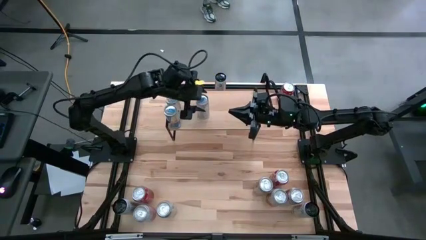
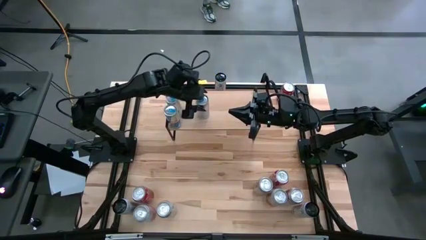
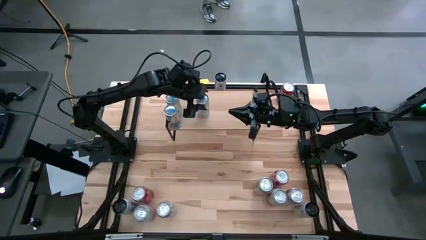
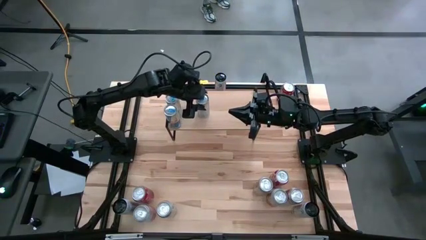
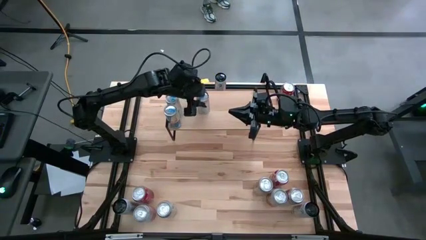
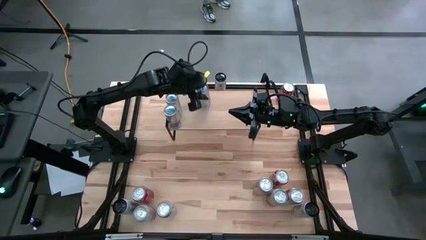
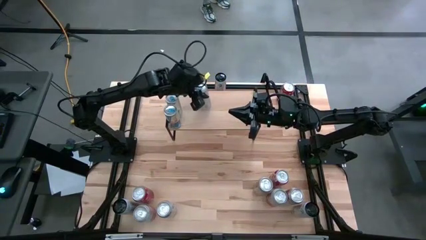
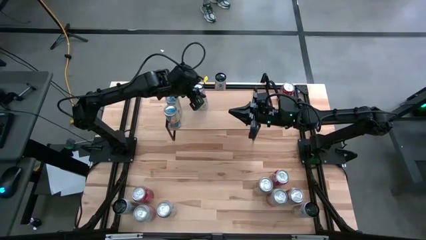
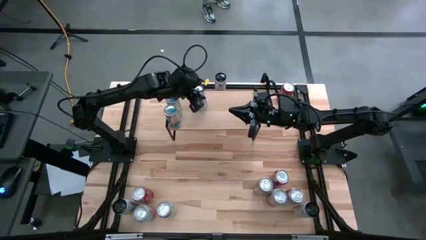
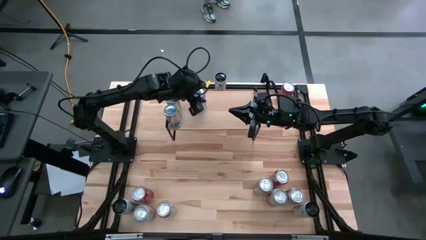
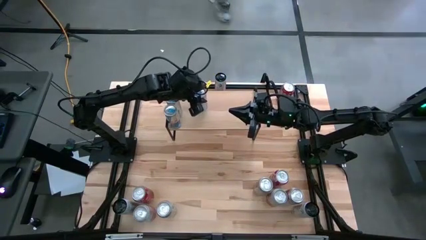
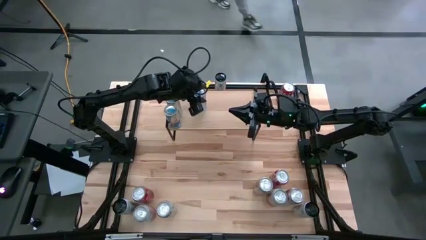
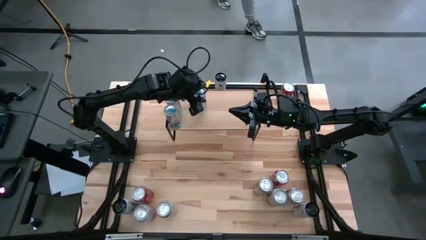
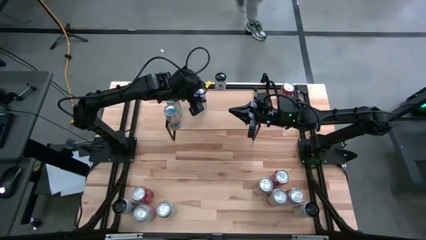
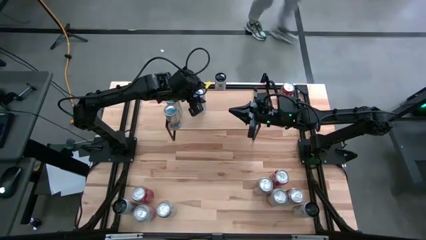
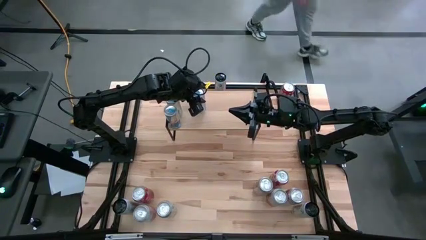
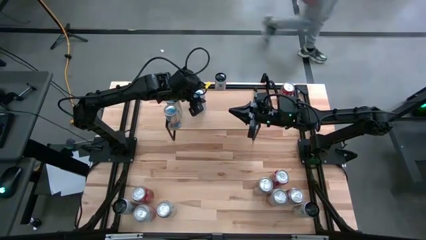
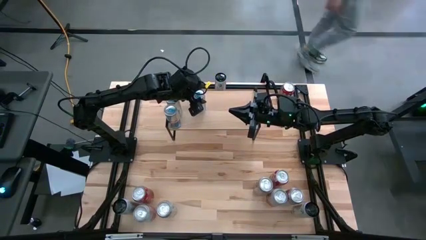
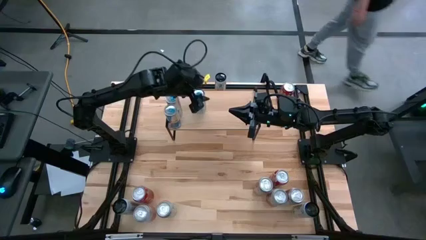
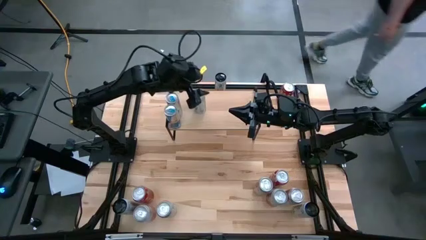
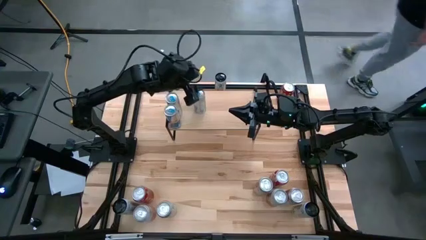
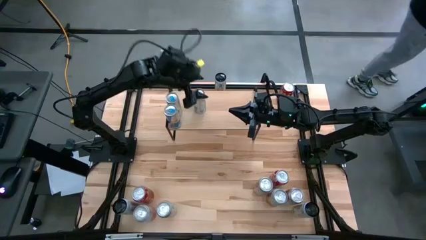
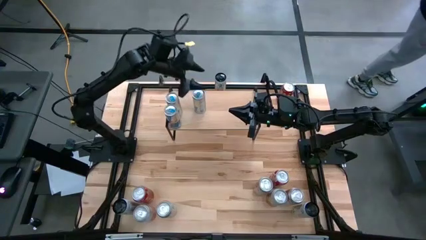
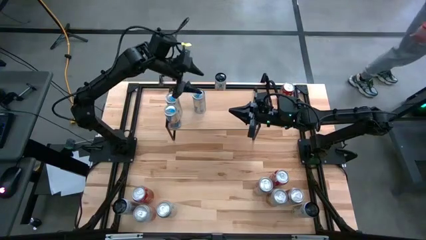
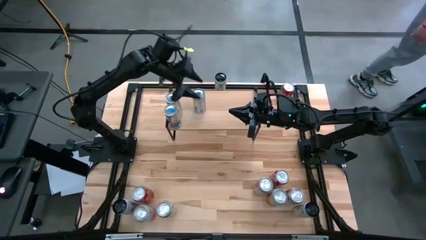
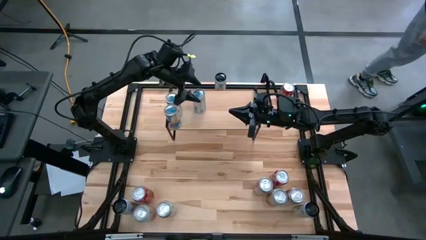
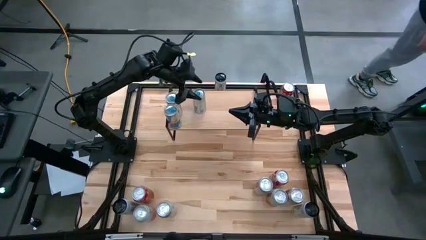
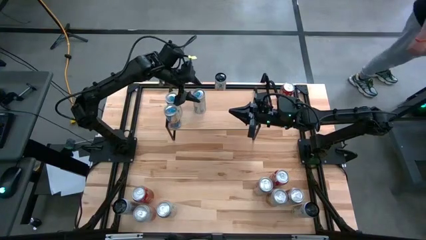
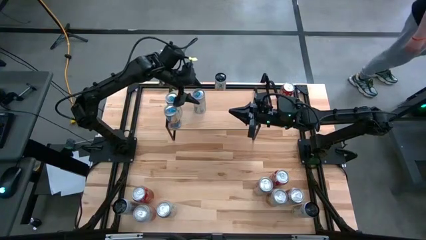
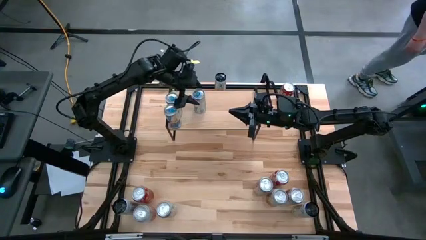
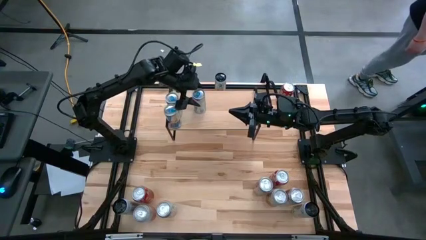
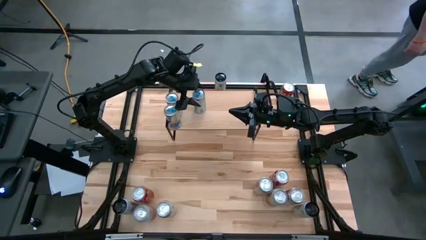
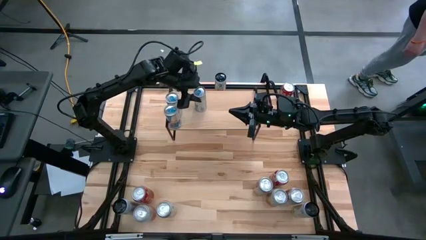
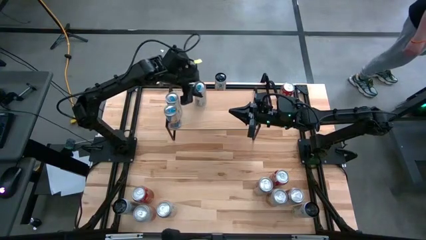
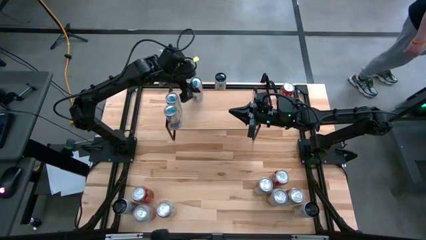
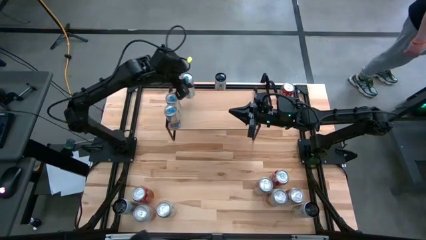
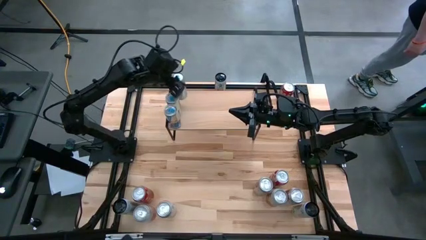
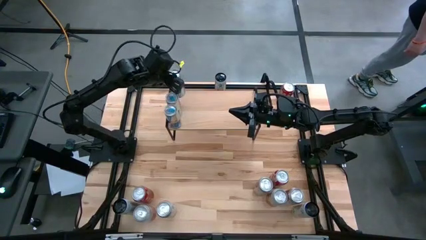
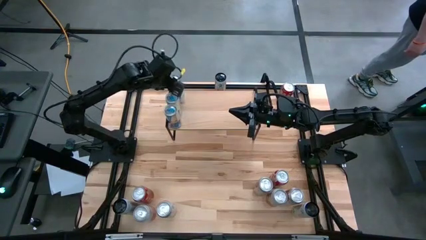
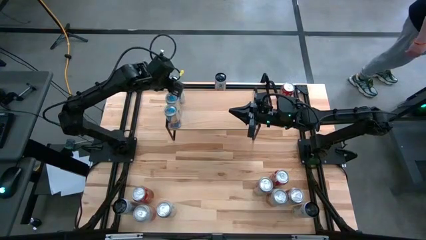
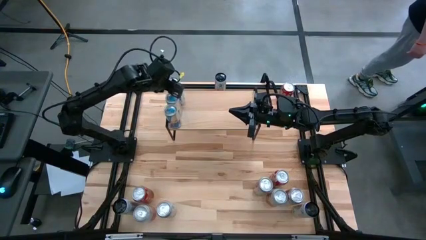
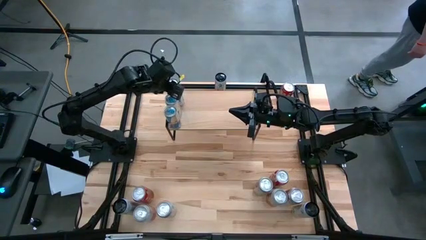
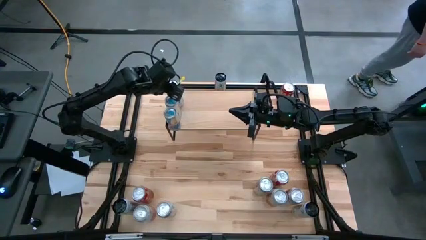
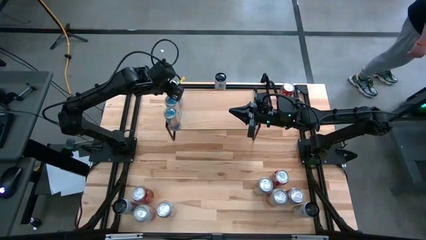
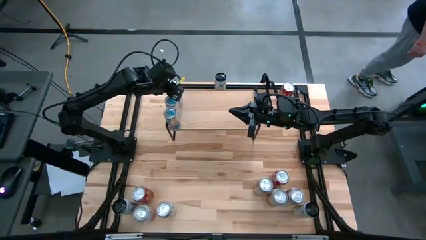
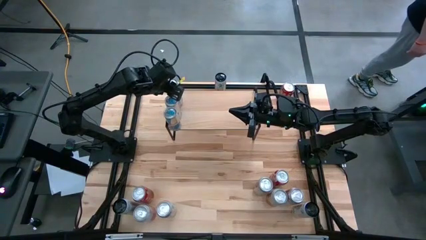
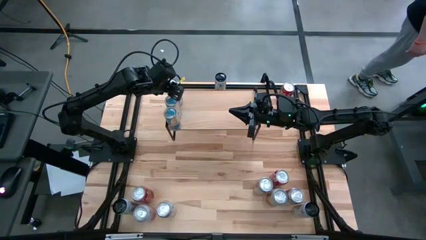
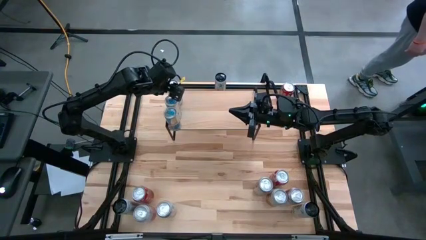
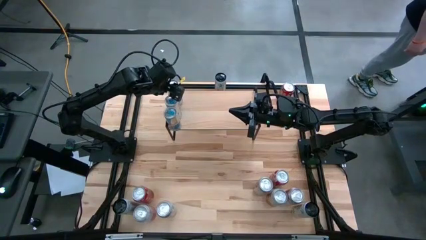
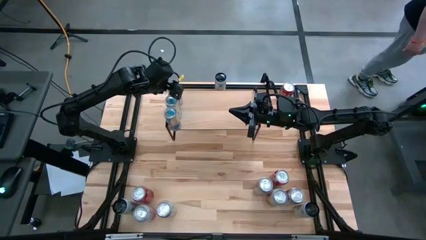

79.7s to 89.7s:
Task: Place canned beverage on shelf
Put the blue soda can aligned with the other blue soda cans on the shelf

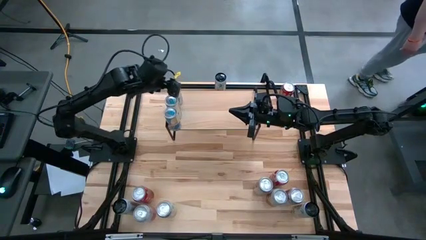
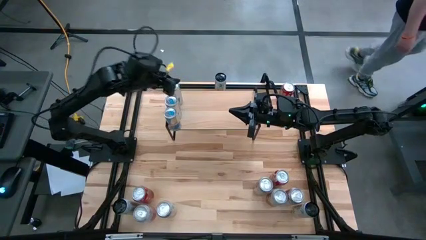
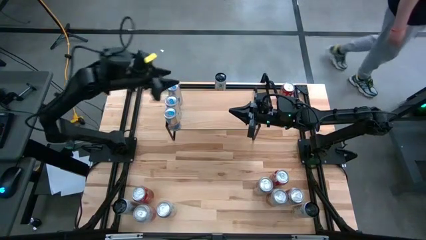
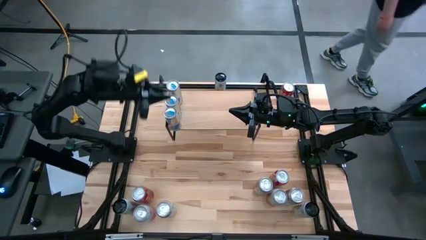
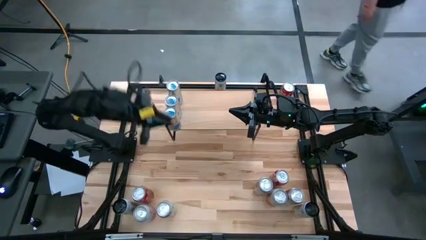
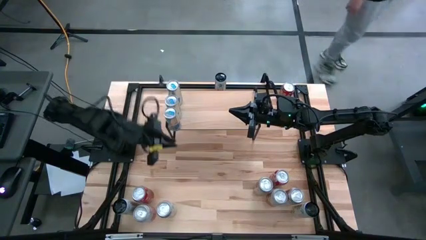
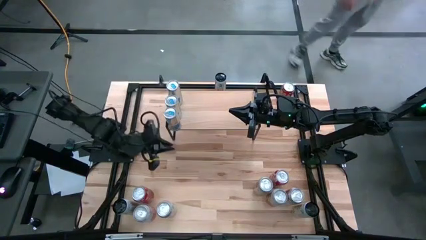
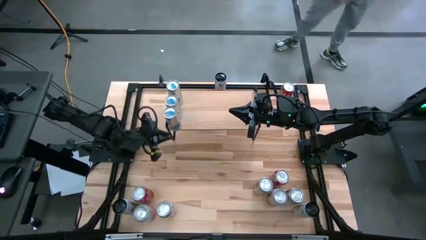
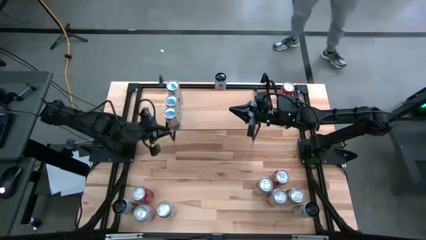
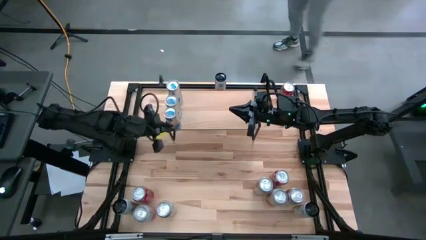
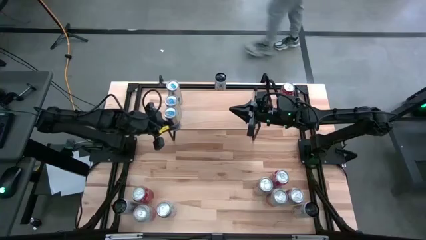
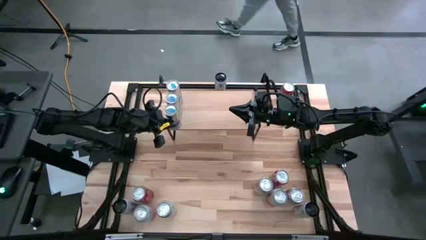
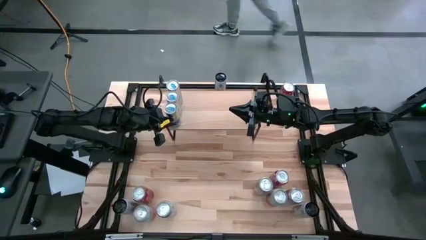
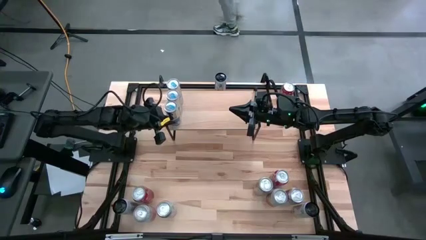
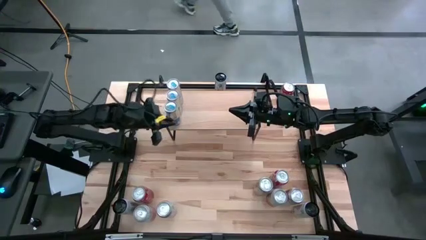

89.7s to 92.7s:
Adjust the bottom blue soda can on the shelf
